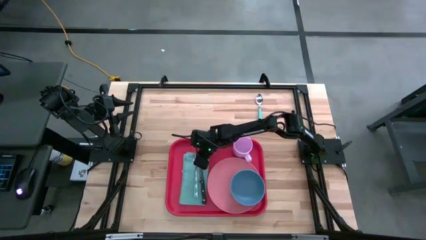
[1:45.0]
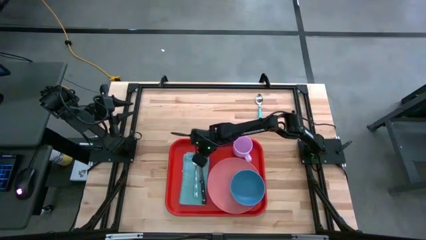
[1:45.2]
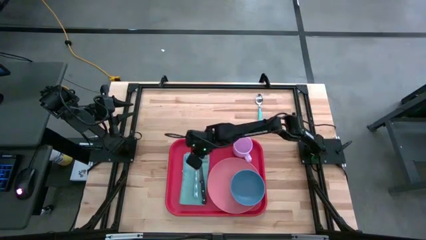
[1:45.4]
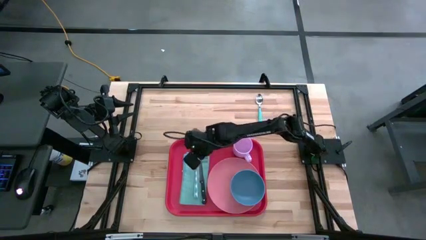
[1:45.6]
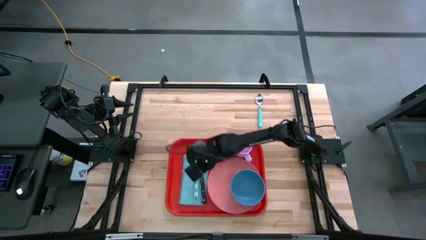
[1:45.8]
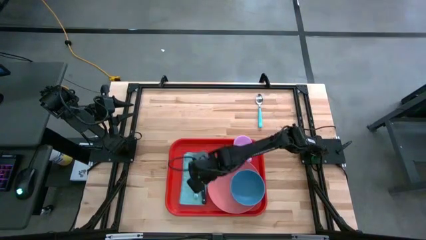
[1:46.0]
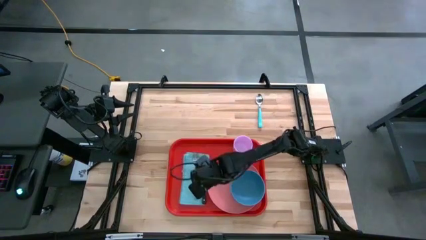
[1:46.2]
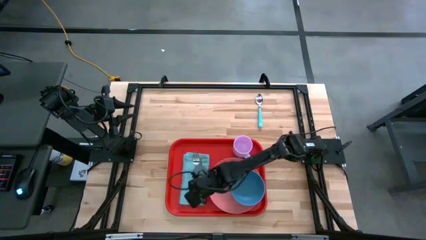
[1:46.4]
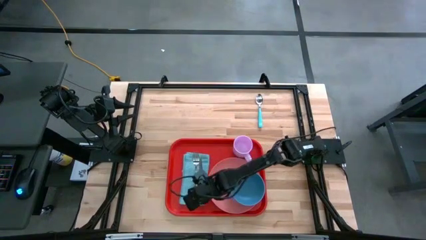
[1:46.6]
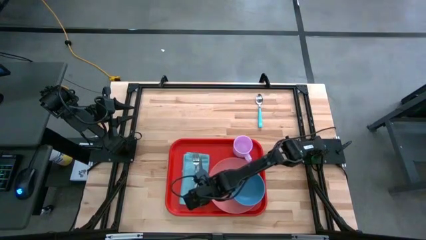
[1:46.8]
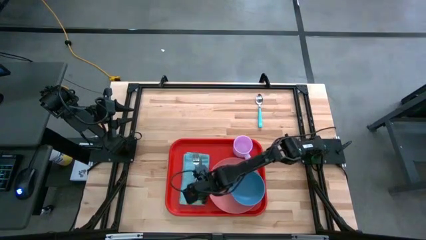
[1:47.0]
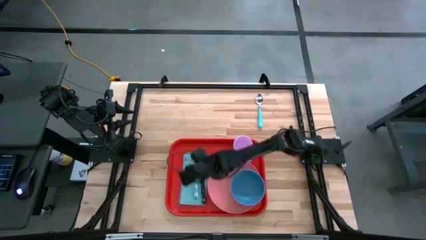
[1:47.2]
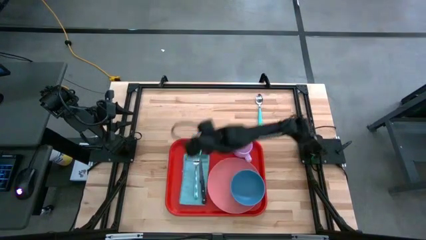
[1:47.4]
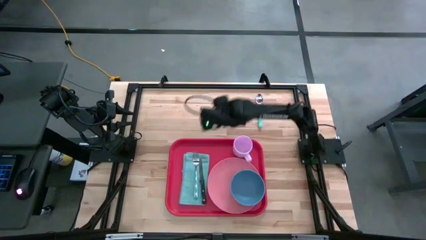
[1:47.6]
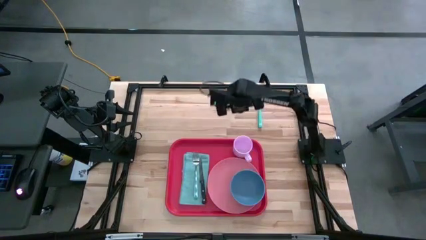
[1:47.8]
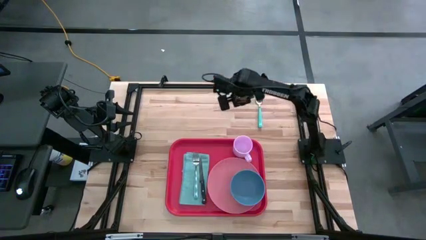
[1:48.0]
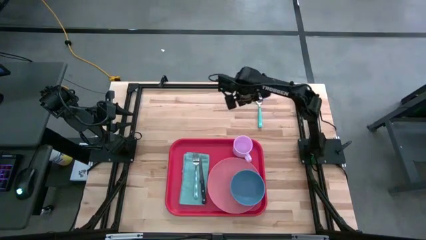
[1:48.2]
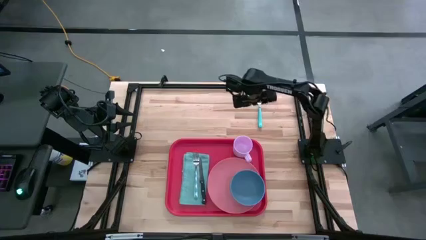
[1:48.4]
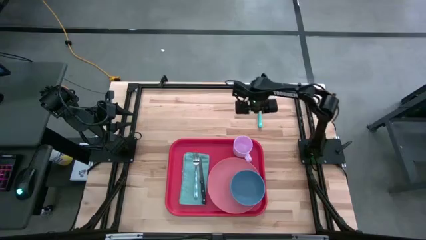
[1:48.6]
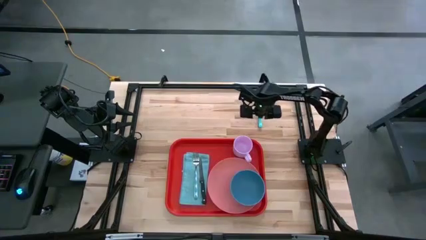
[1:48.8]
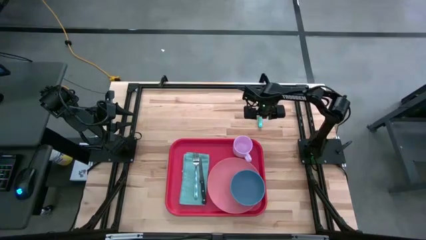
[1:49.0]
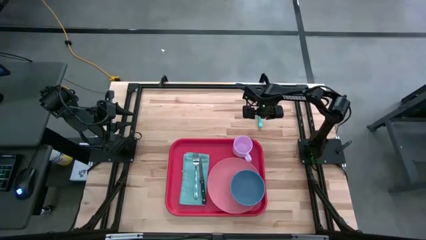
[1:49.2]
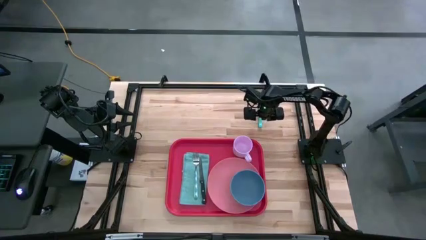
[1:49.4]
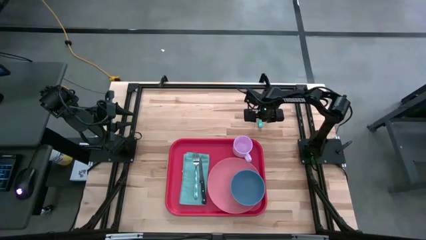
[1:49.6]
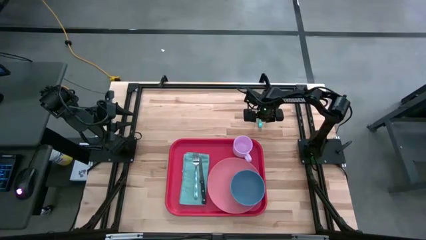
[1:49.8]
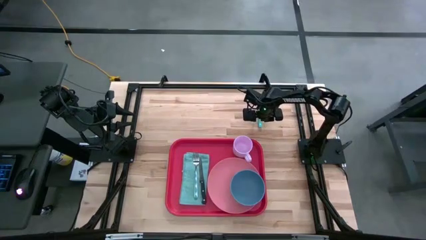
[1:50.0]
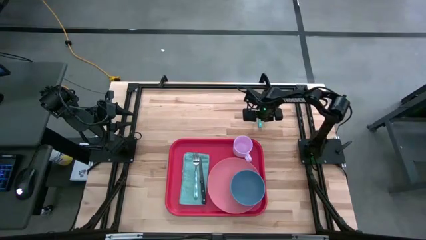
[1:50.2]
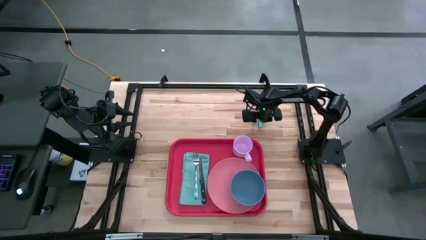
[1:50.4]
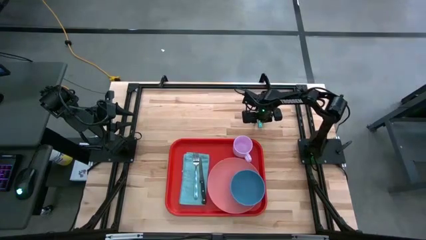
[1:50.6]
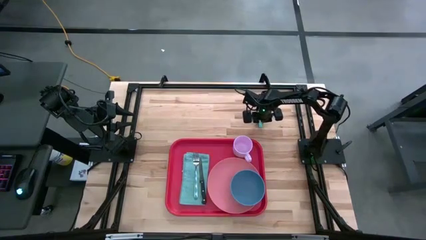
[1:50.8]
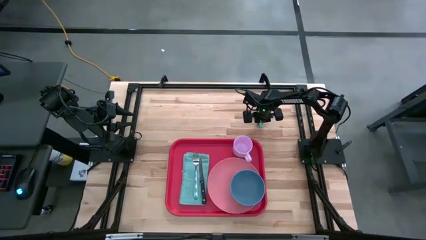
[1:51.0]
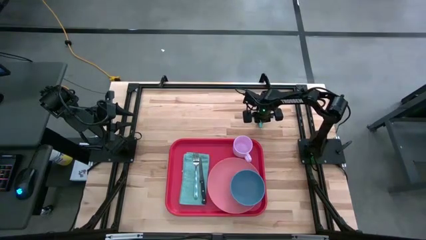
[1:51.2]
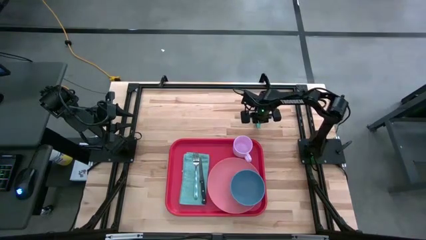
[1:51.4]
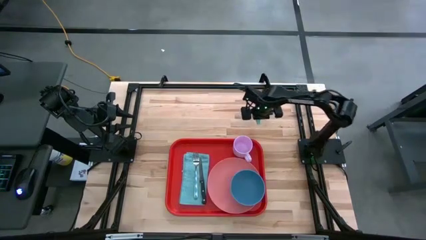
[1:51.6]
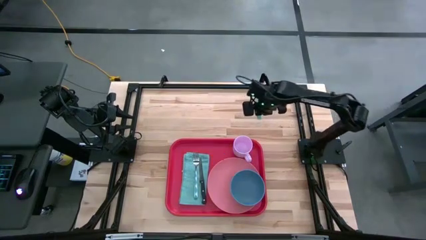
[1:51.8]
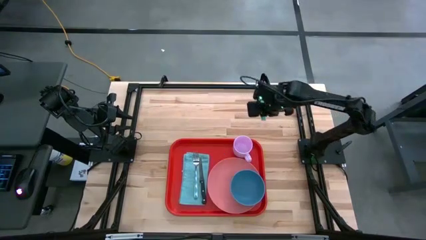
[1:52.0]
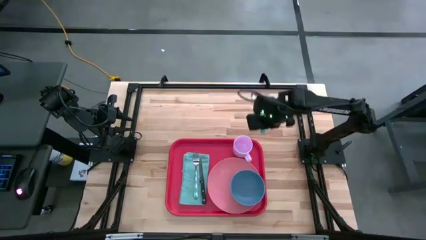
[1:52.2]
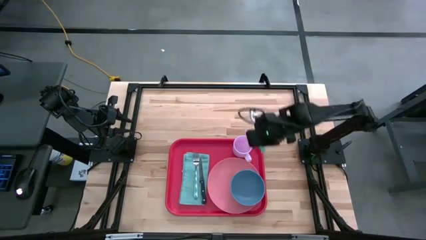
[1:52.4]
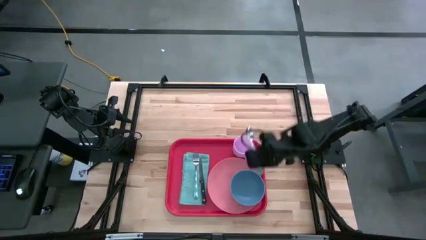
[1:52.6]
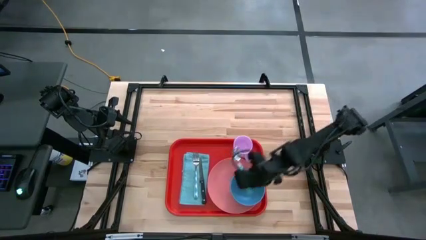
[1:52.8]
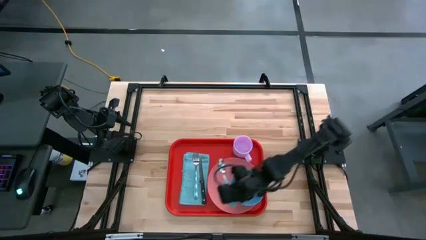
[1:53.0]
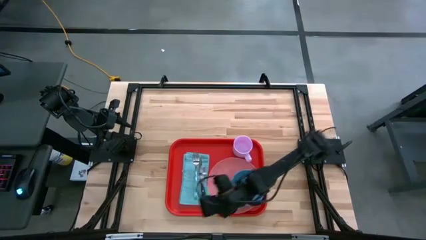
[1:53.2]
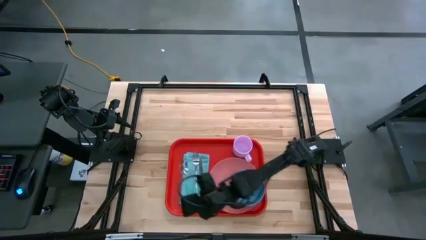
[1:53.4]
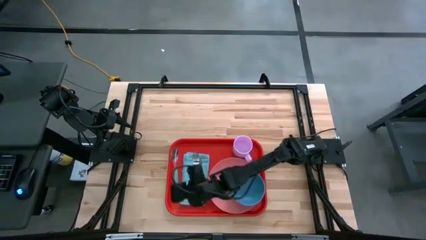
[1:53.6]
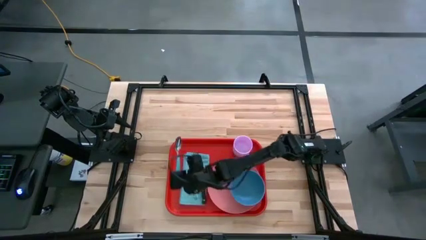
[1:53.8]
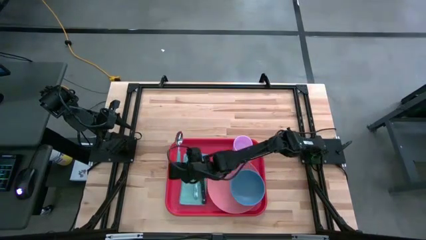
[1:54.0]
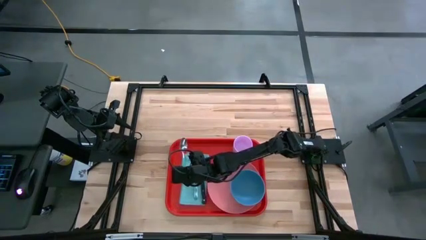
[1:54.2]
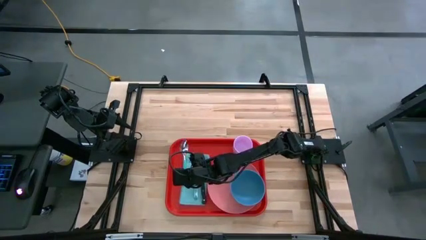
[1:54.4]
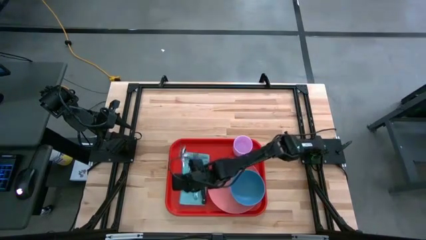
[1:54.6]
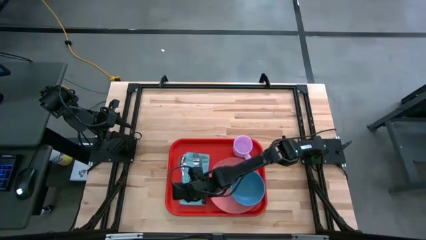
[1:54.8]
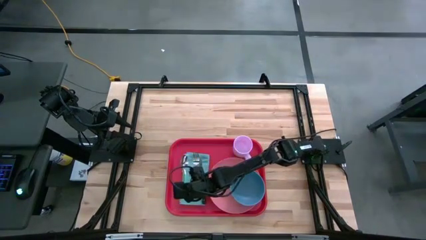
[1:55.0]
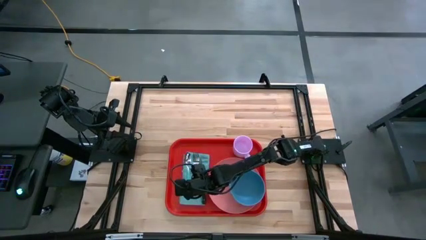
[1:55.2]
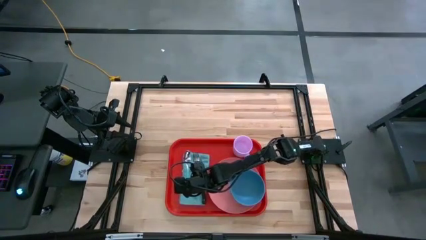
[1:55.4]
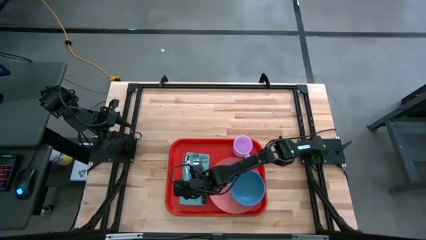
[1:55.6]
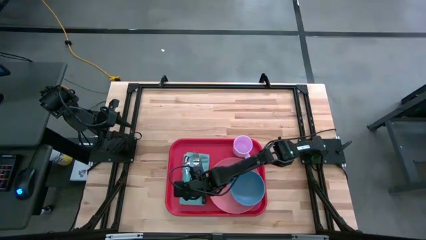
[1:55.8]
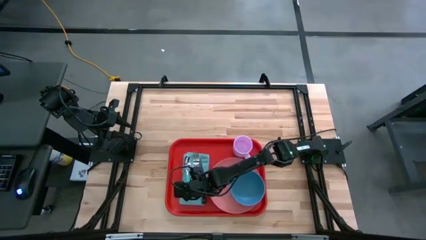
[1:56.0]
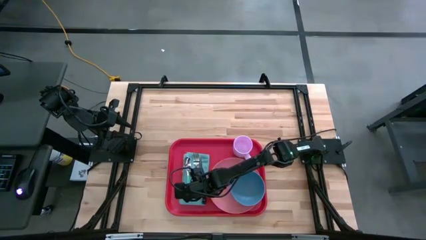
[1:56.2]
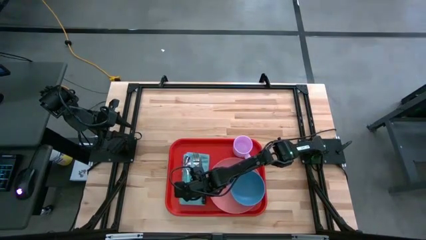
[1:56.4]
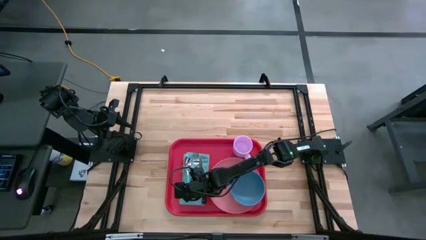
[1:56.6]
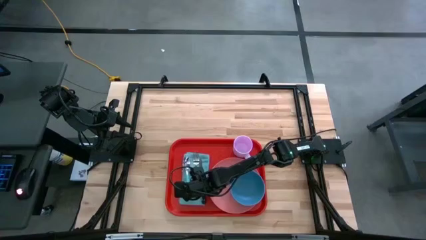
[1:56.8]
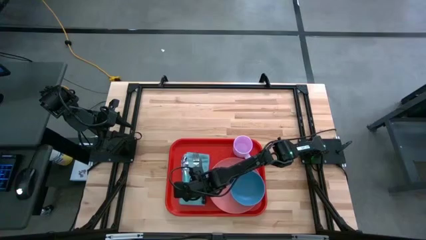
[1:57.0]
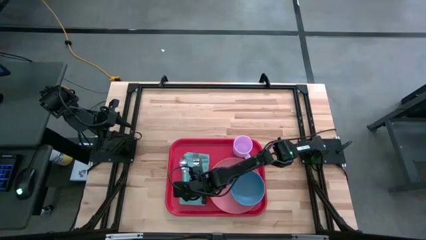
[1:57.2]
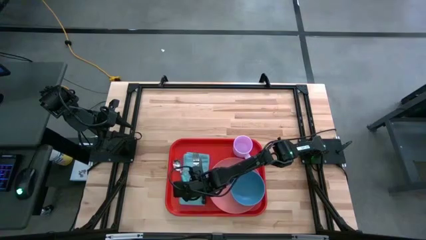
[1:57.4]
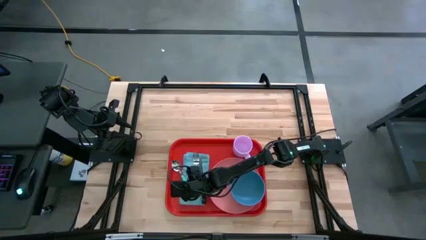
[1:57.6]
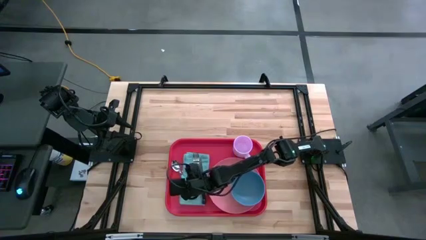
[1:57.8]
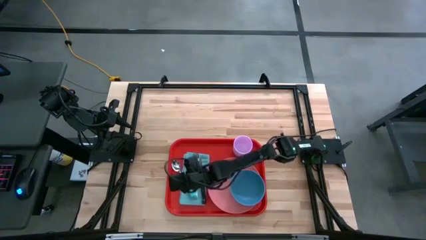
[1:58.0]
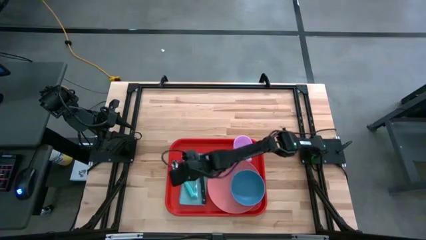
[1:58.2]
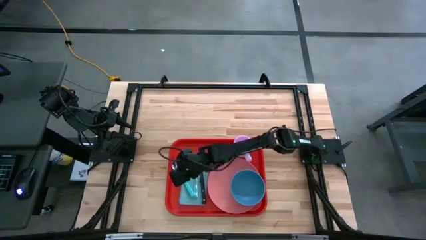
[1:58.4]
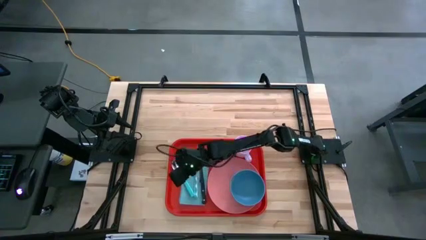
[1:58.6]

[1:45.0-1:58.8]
Task: Set up tray
Put the blue spoon on the blue napkin to the left side of the blue fork on the red serving tray
